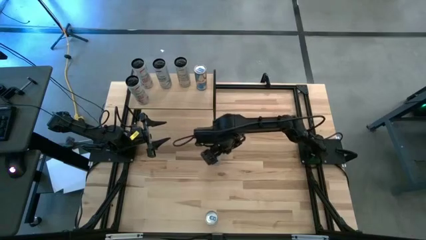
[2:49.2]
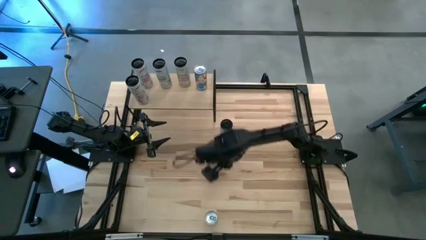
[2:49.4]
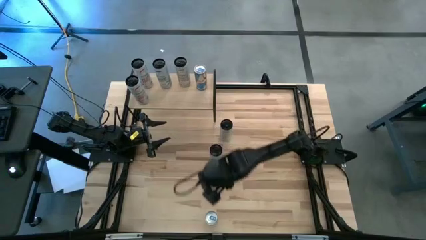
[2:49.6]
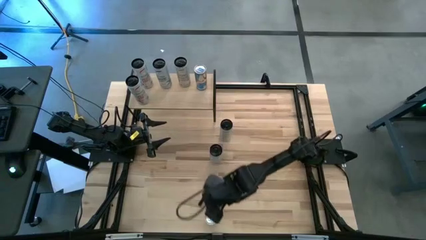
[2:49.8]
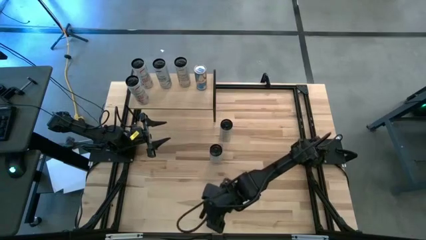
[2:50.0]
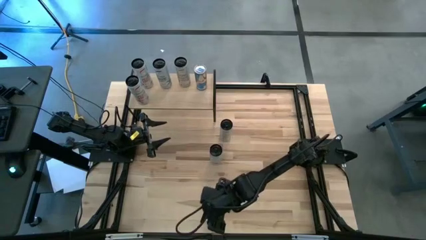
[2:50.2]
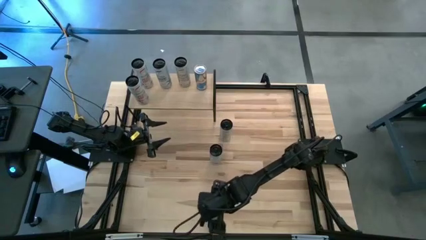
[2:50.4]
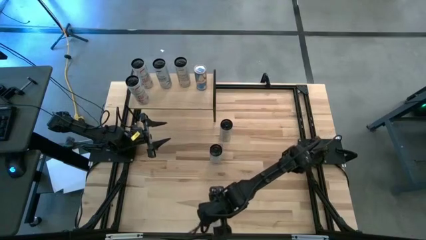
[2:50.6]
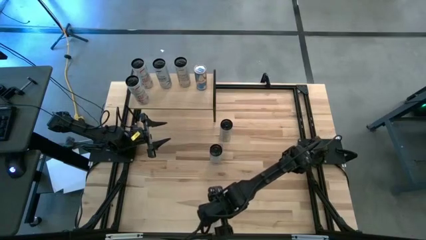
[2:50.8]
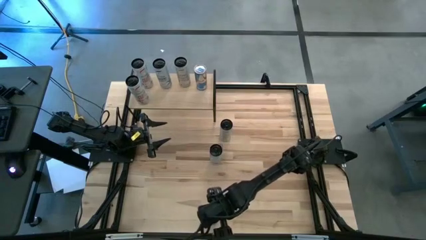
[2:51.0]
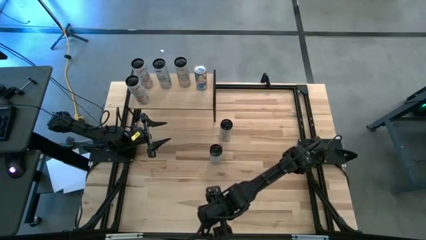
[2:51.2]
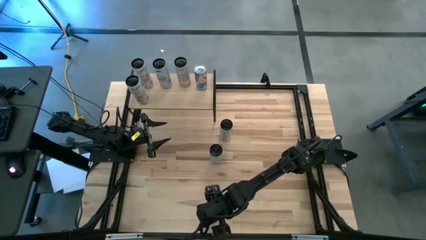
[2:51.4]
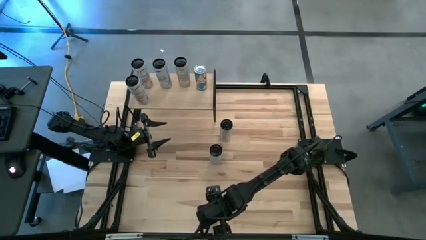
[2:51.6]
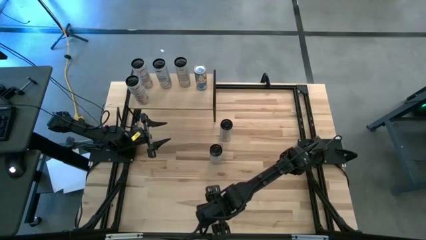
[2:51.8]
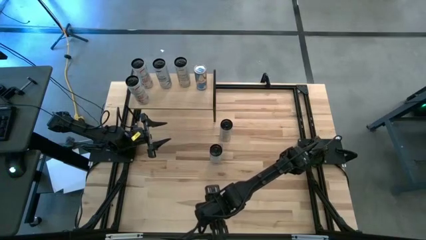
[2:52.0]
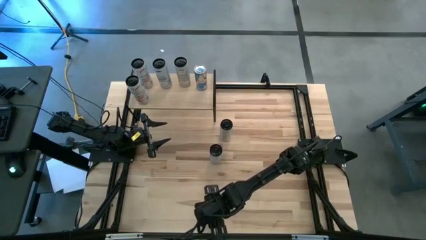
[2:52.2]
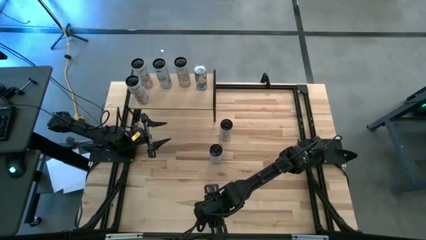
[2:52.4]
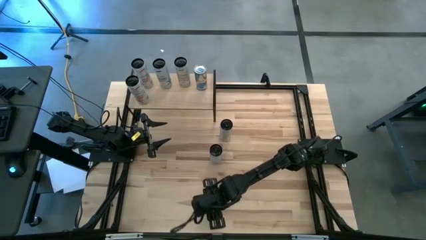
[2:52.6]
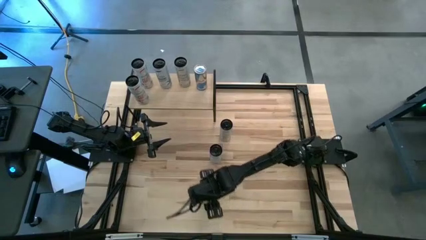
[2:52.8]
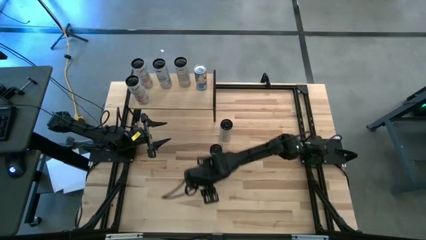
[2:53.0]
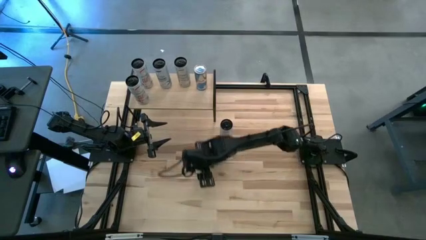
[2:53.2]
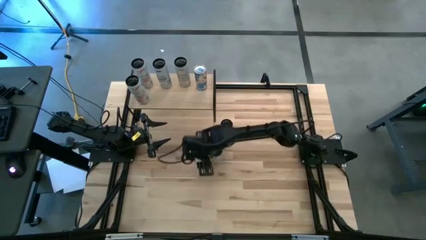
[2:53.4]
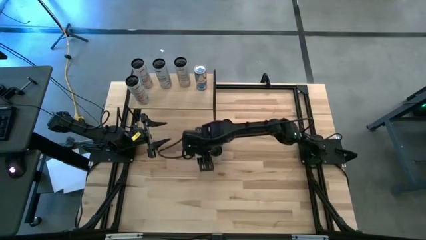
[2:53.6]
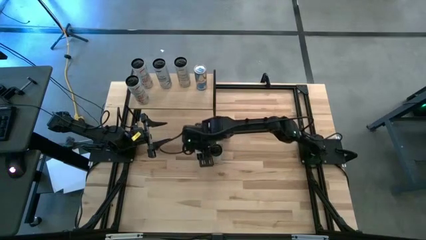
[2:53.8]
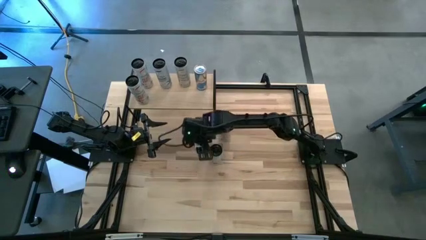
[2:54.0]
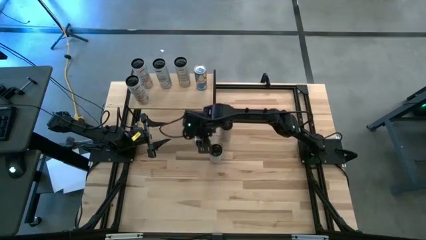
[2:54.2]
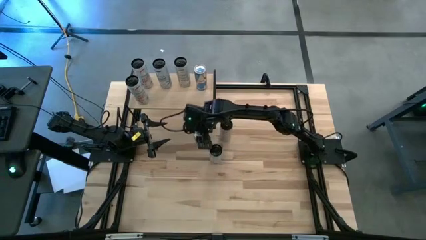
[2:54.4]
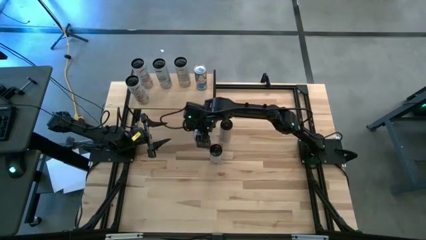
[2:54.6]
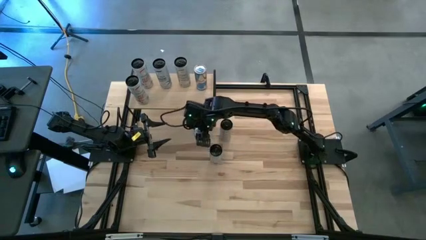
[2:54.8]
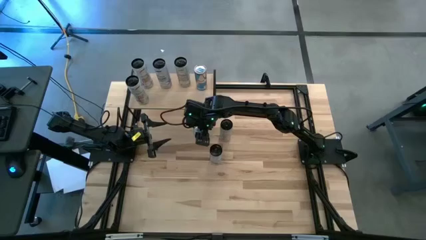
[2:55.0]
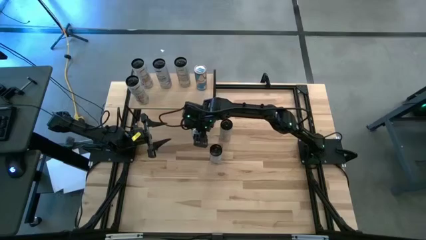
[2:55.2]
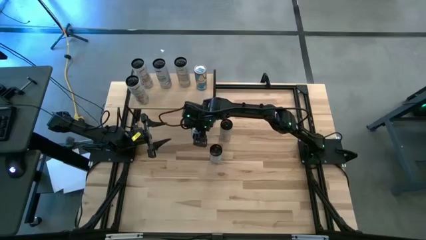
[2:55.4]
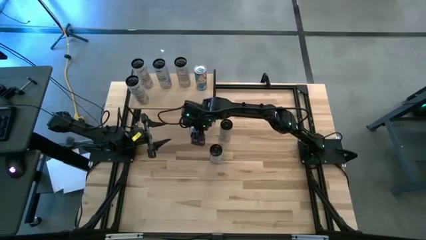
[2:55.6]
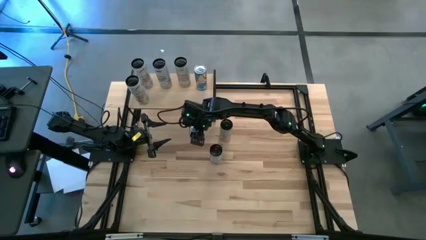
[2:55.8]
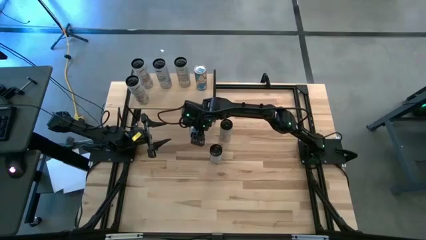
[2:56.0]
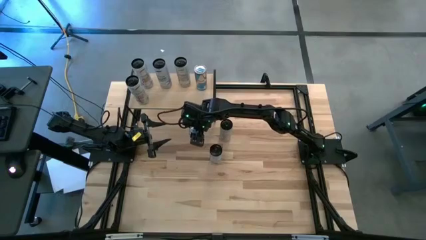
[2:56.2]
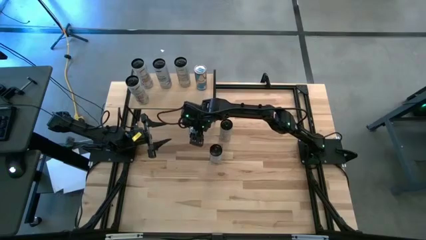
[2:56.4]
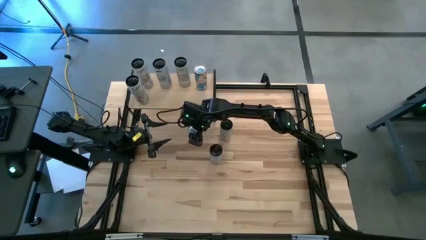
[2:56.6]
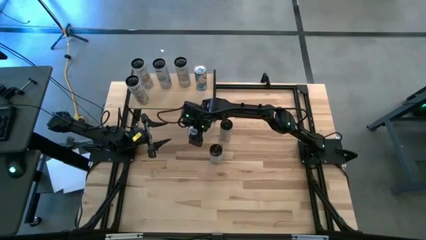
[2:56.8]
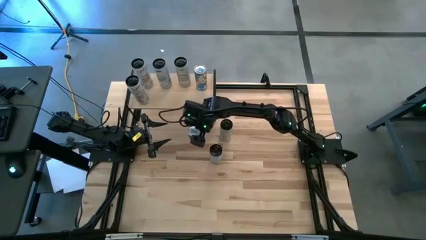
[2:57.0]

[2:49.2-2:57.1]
Task: Place canned beverage on shelf
Move the blue soda can to the center of the table

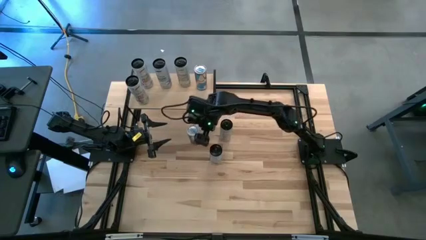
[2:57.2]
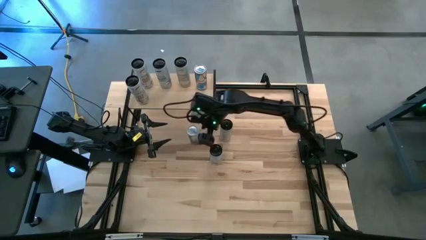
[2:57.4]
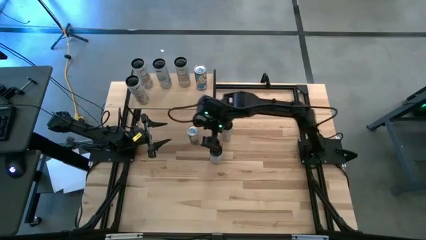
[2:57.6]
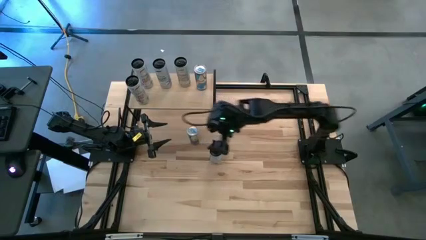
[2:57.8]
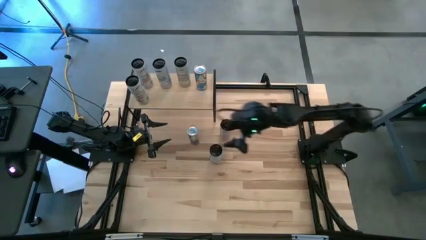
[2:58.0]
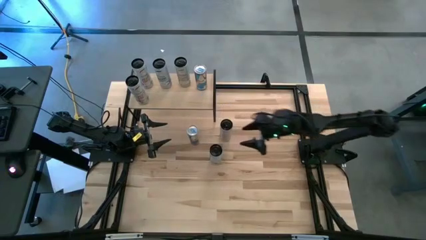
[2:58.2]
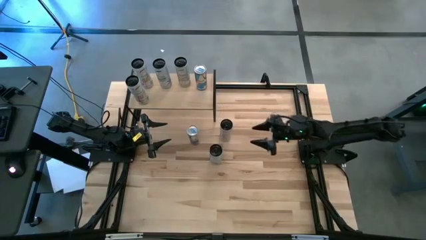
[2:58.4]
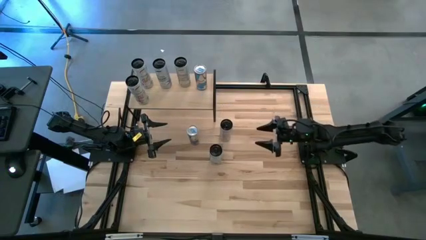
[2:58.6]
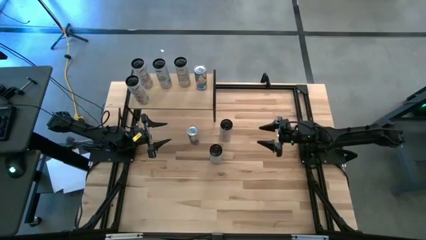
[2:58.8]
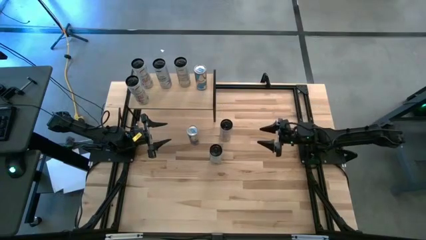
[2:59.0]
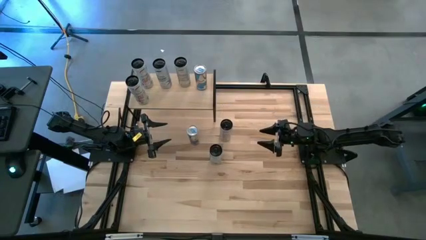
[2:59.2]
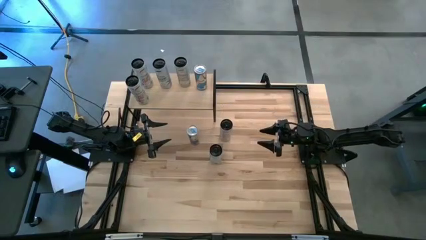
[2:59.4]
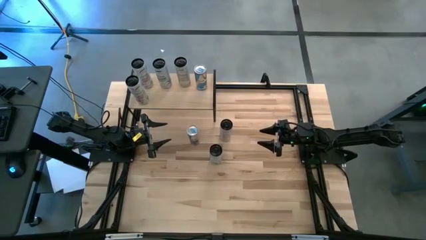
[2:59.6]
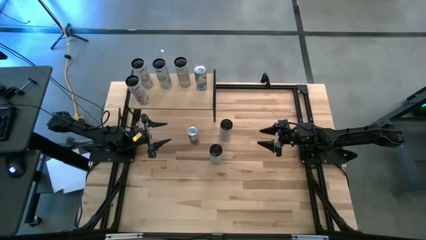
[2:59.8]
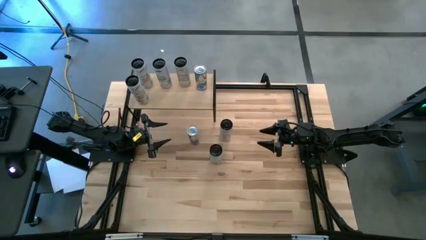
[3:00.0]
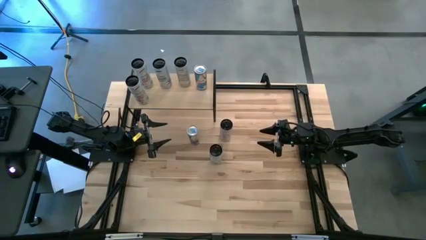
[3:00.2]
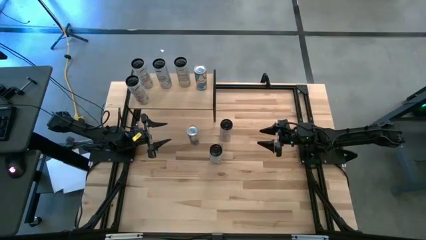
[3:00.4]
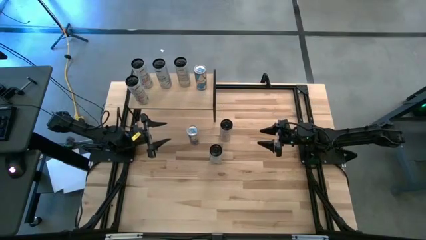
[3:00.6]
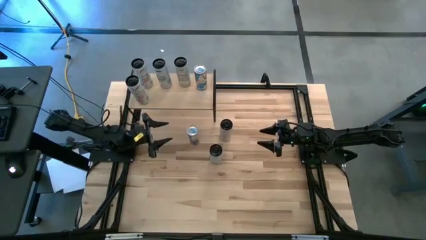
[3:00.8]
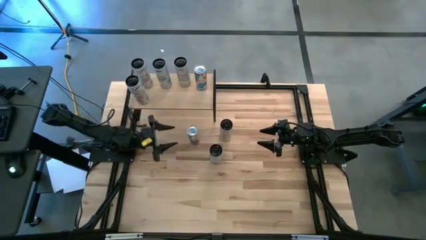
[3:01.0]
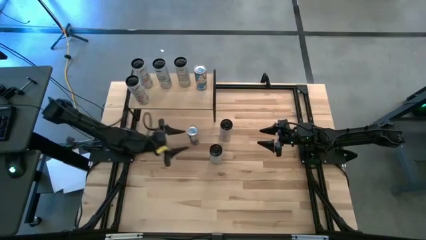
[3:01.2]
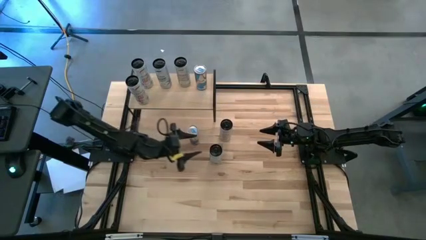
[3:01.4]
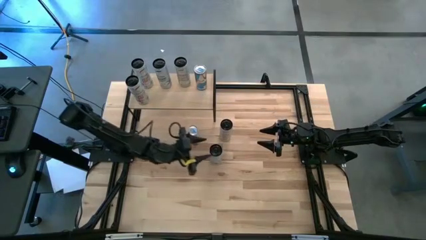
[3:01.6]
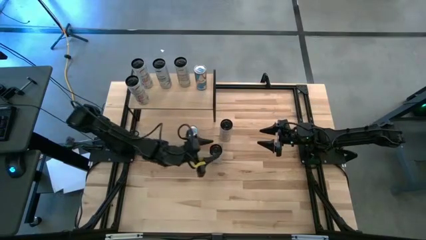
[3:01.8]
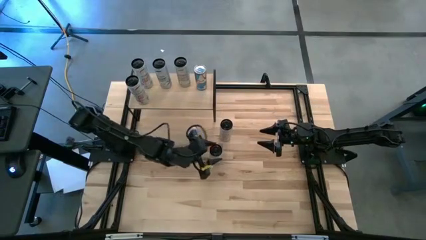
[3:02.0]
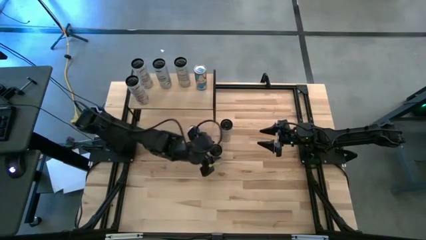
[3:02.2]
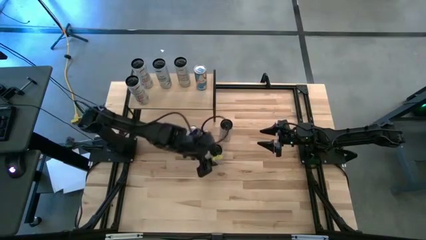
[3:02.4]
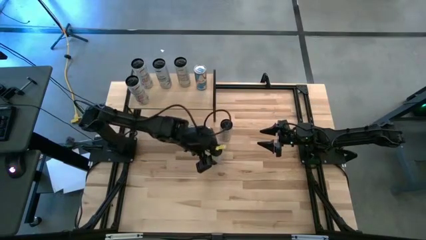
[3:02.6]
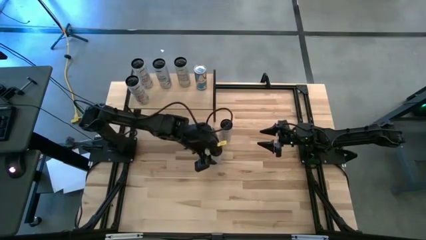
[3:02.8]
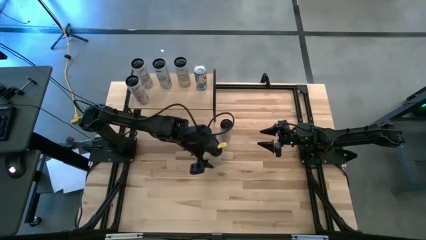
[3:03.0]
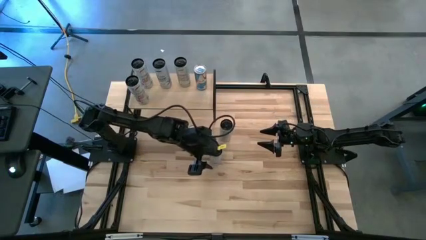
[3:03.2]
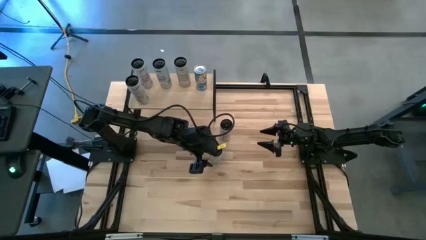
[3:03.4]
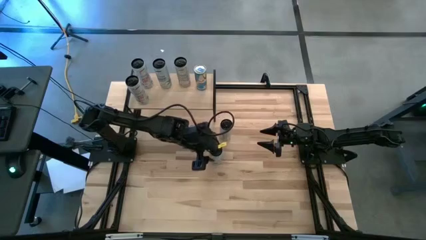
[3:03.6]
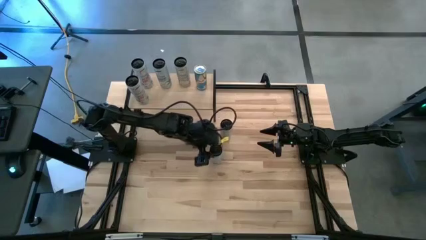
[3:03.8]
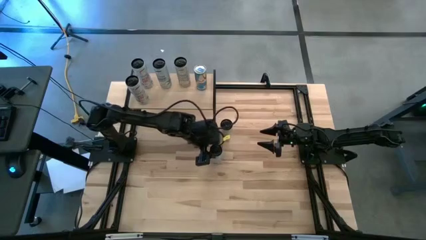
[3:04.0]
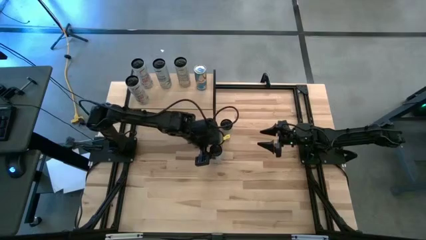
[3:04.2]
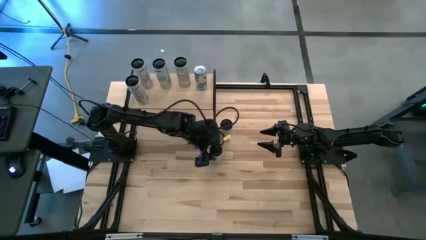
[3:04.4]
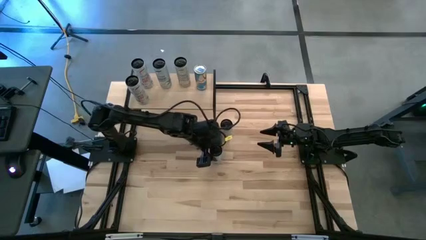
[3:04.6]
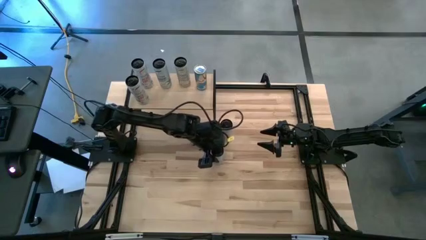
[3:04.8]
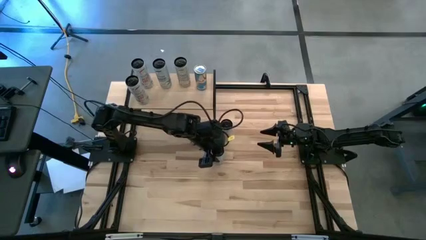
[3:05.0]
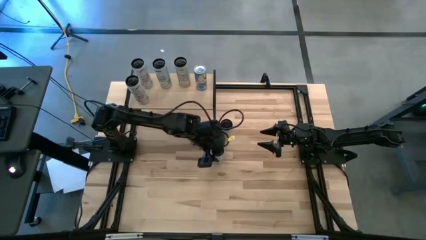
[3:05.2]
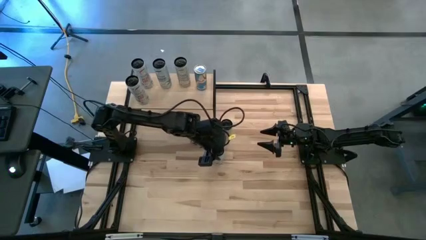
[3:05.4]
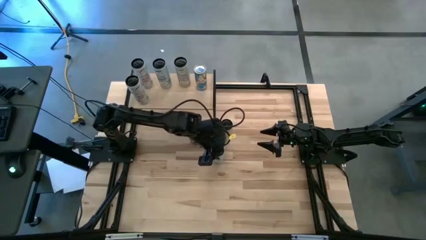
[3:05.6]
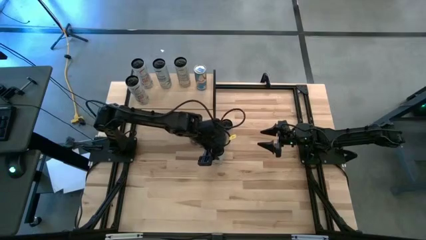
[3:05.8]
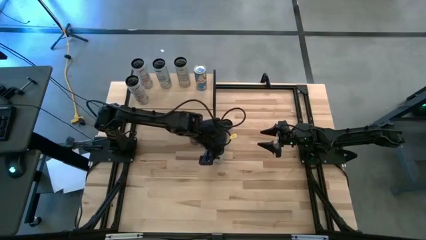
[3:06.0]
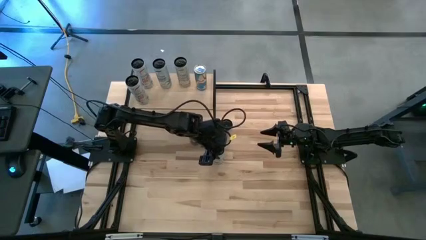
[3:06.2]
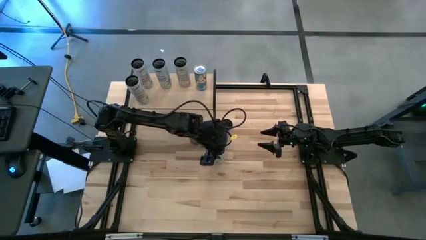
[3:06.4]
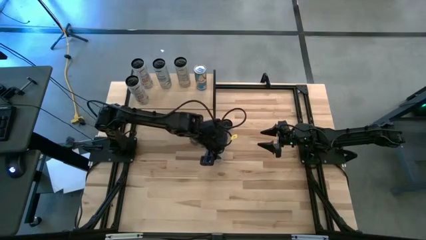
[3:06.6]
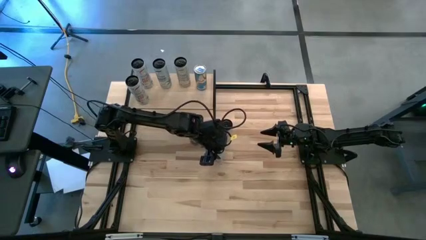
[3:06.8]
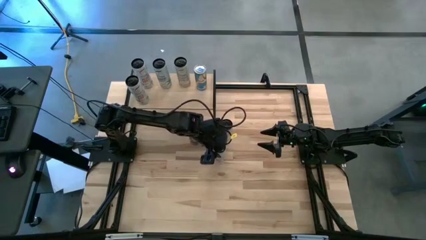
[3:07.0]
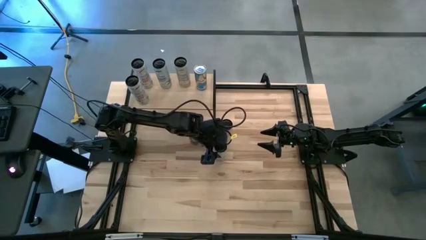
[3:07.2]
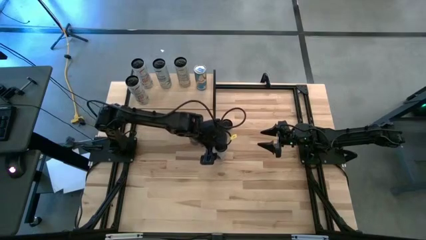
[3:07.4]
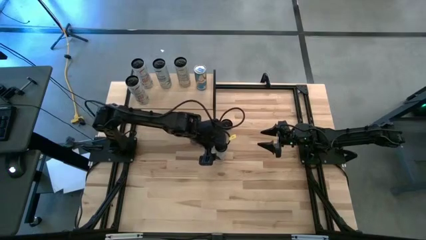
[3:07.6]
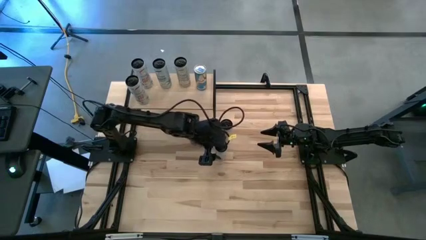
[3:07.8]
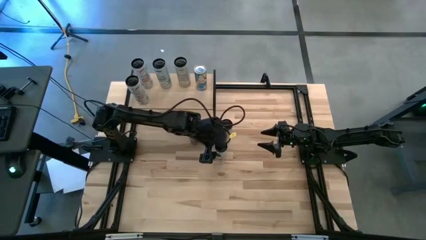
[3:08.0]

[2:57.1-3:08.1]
Put the white blue soda can on the shelf aligned with the other white blue soda can
